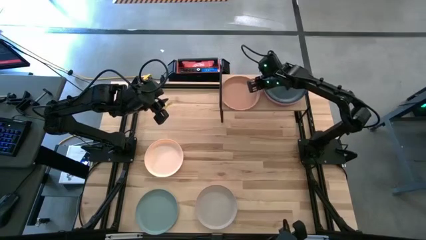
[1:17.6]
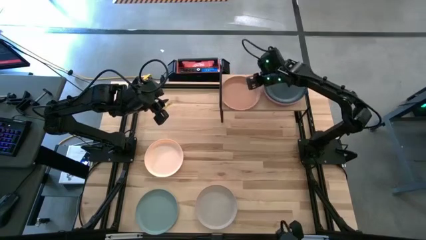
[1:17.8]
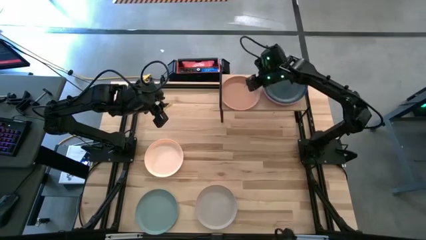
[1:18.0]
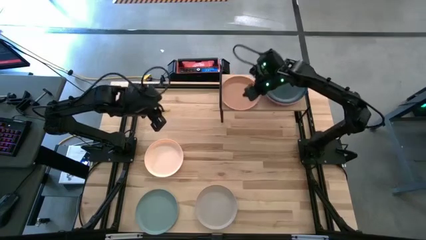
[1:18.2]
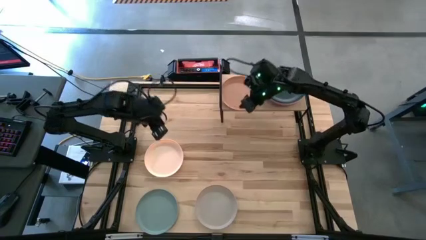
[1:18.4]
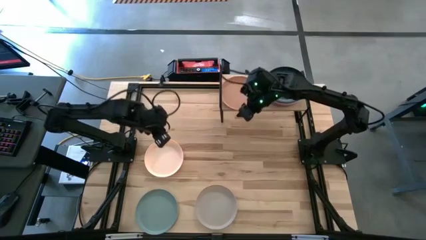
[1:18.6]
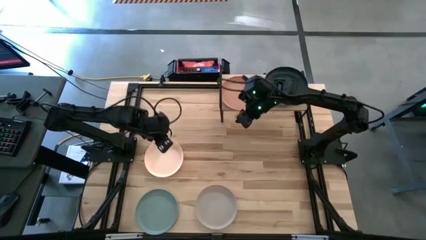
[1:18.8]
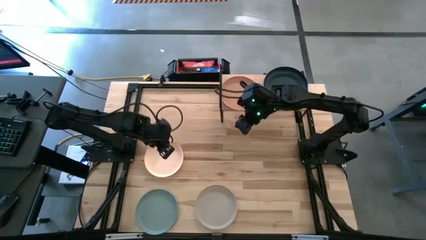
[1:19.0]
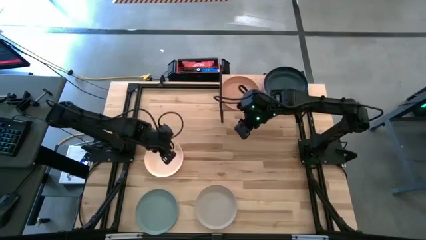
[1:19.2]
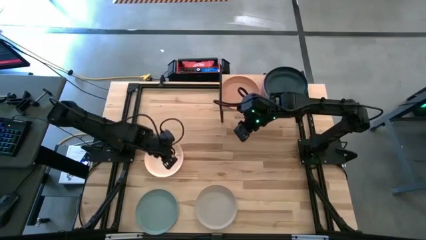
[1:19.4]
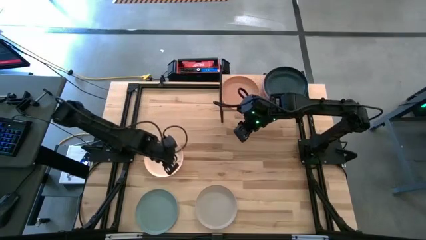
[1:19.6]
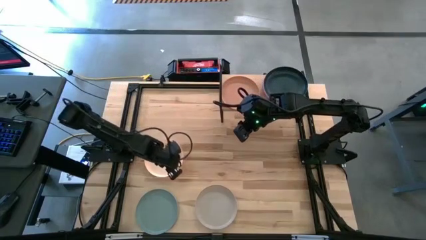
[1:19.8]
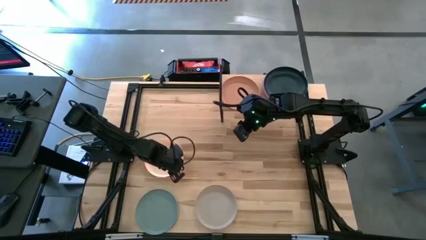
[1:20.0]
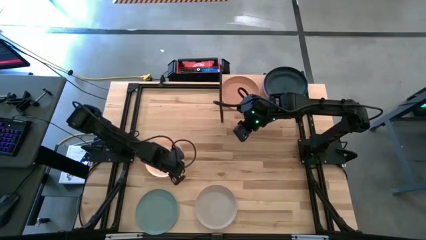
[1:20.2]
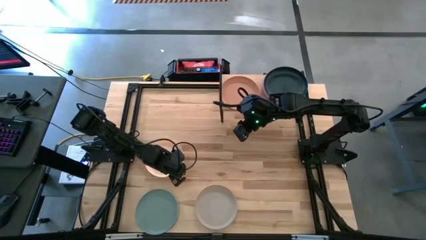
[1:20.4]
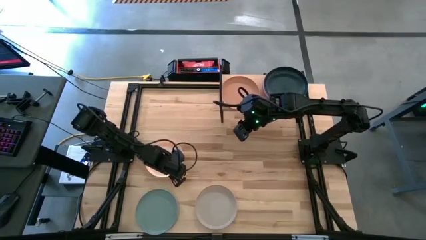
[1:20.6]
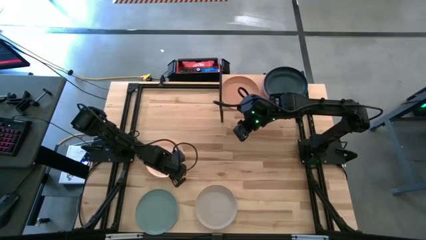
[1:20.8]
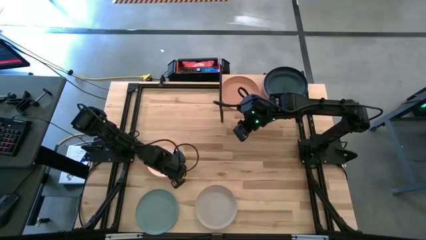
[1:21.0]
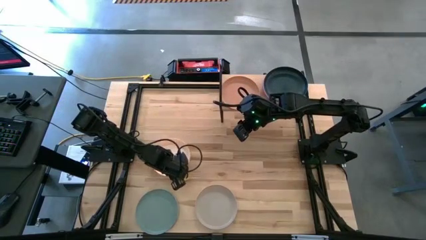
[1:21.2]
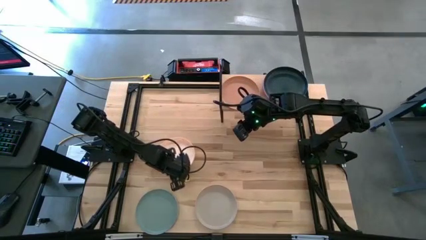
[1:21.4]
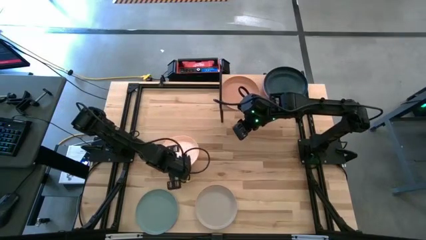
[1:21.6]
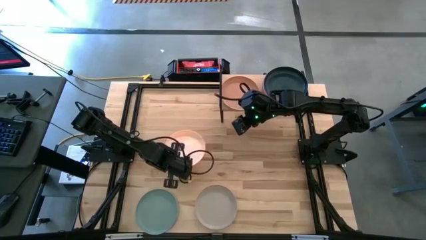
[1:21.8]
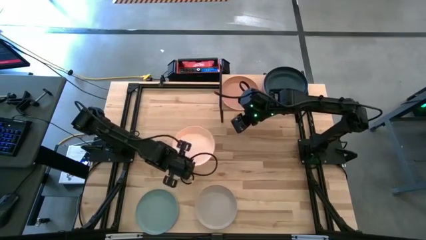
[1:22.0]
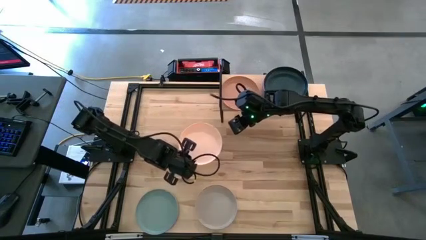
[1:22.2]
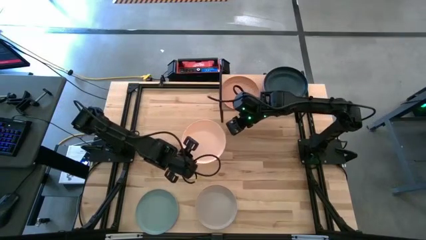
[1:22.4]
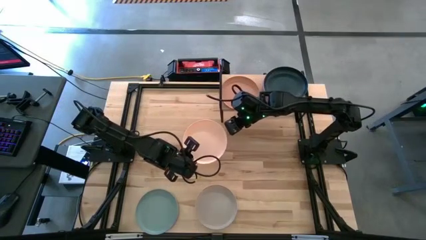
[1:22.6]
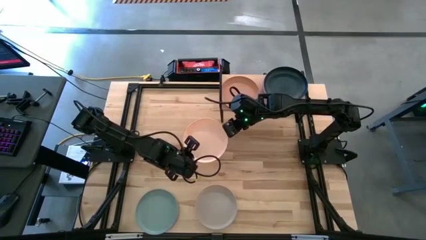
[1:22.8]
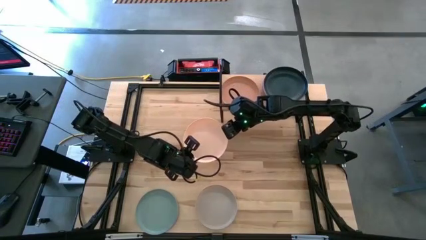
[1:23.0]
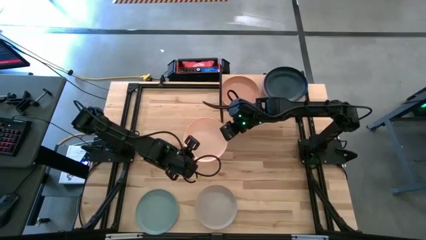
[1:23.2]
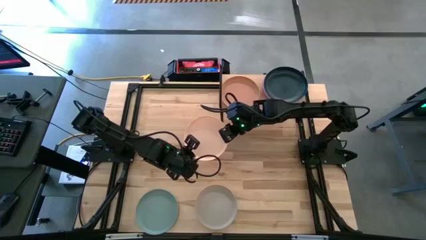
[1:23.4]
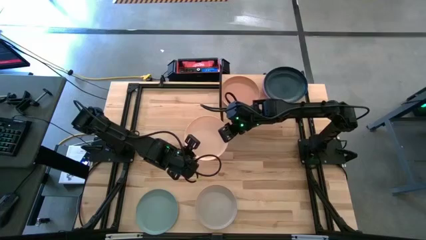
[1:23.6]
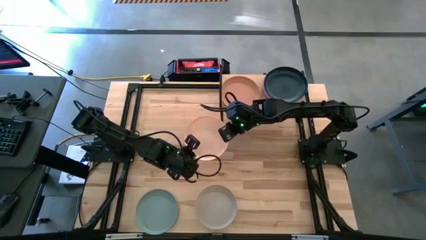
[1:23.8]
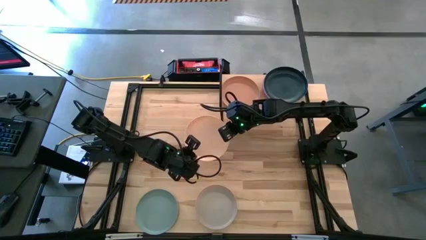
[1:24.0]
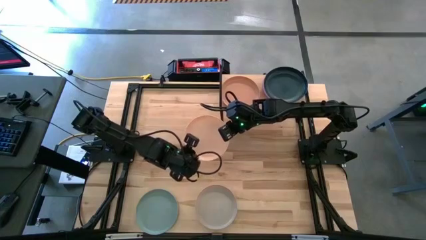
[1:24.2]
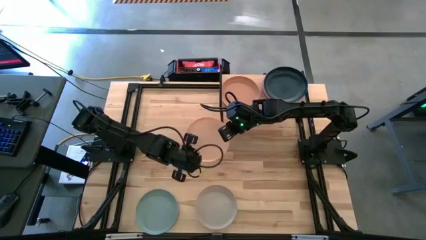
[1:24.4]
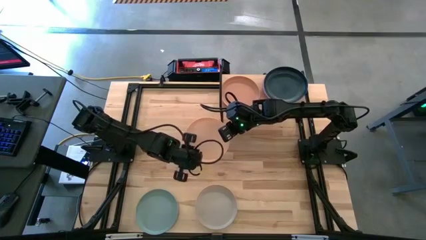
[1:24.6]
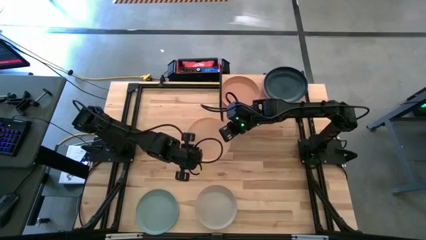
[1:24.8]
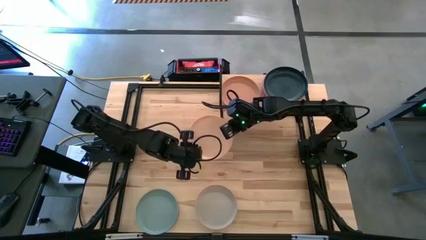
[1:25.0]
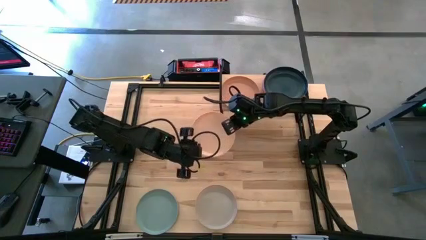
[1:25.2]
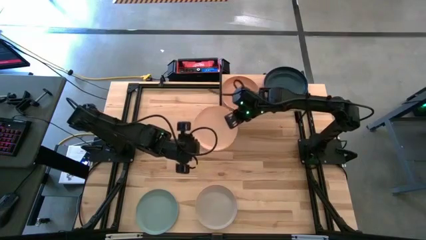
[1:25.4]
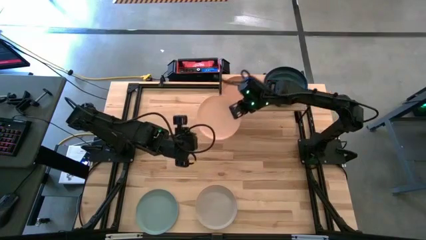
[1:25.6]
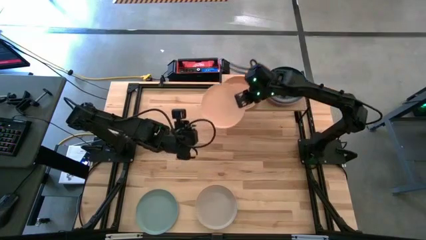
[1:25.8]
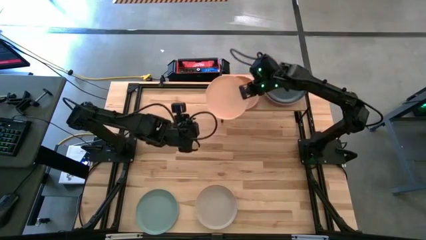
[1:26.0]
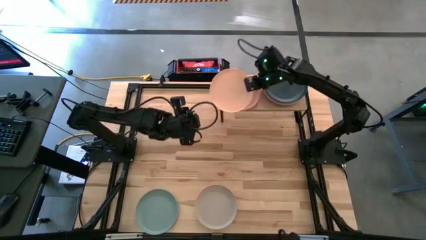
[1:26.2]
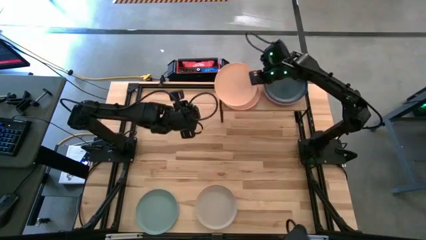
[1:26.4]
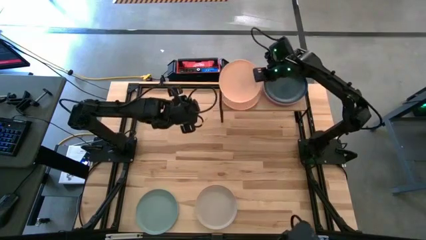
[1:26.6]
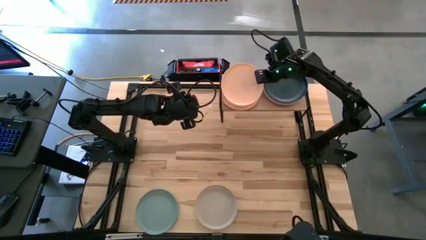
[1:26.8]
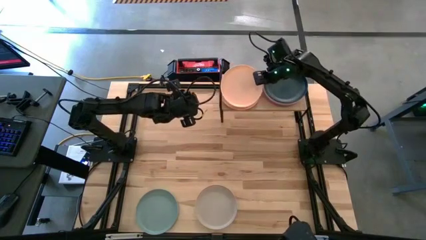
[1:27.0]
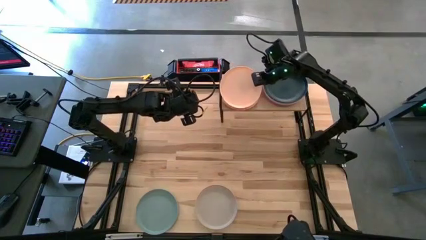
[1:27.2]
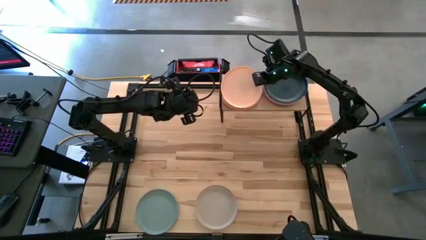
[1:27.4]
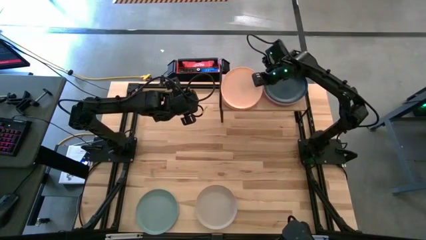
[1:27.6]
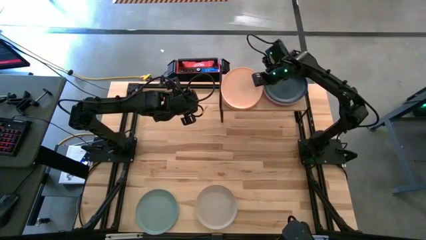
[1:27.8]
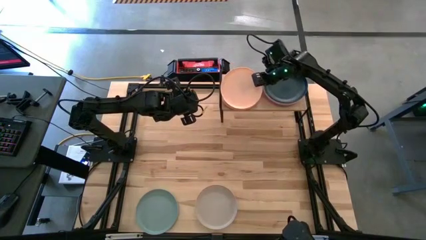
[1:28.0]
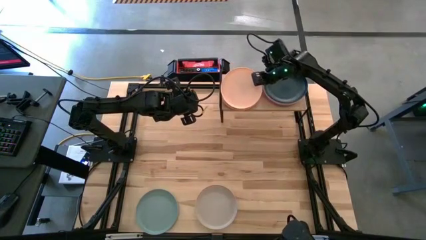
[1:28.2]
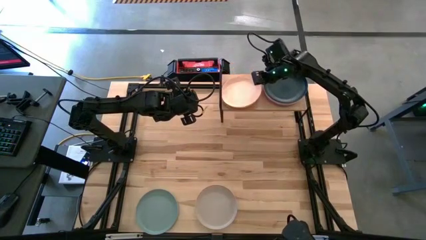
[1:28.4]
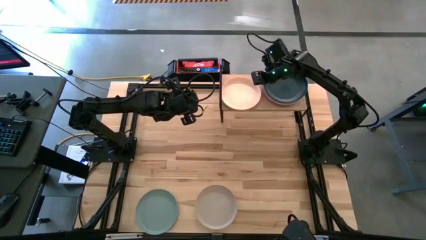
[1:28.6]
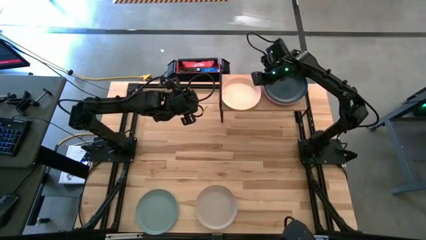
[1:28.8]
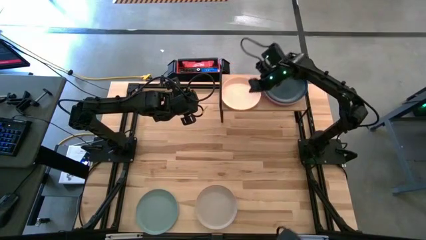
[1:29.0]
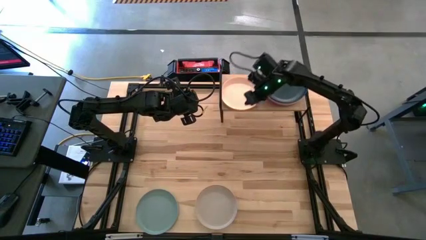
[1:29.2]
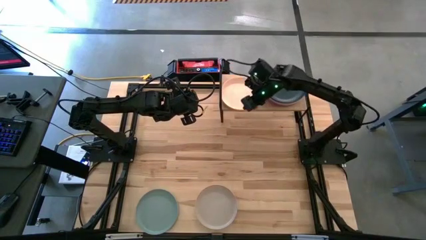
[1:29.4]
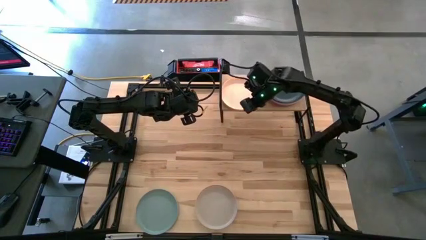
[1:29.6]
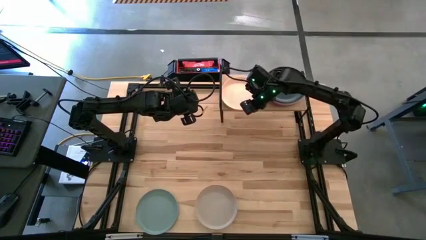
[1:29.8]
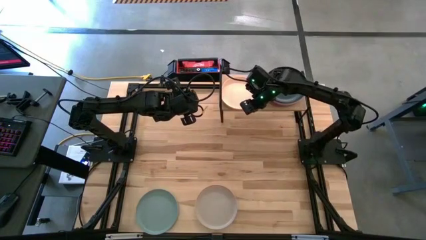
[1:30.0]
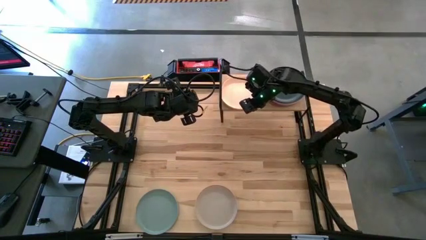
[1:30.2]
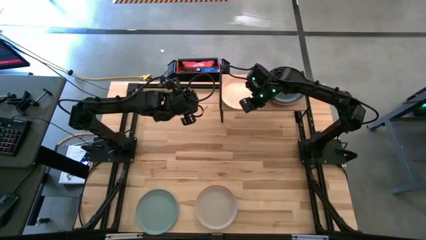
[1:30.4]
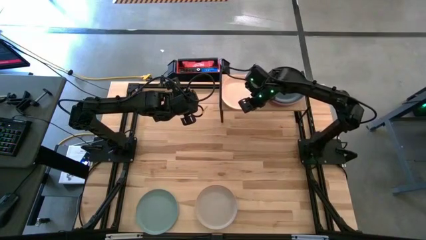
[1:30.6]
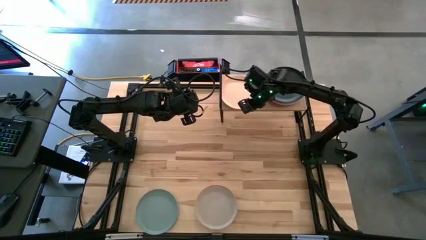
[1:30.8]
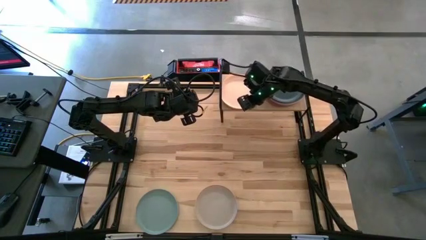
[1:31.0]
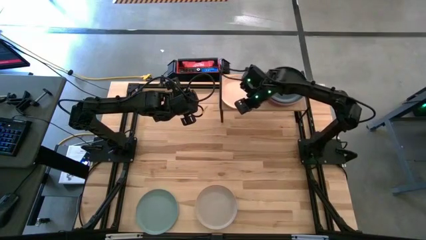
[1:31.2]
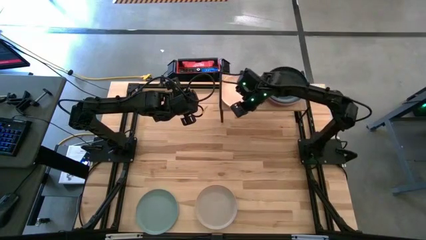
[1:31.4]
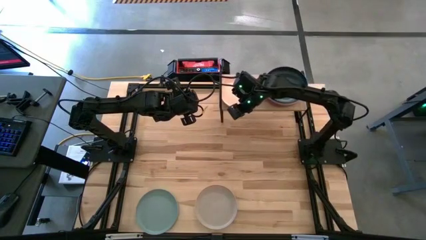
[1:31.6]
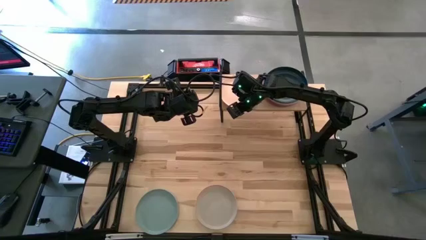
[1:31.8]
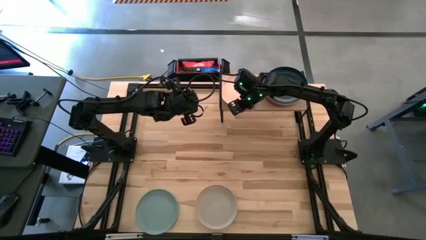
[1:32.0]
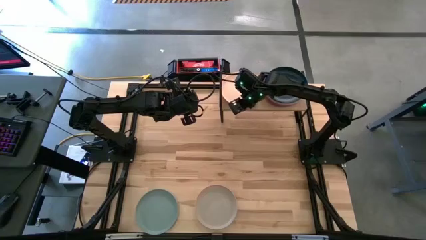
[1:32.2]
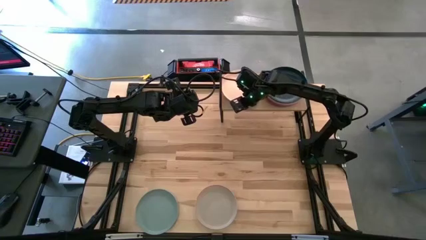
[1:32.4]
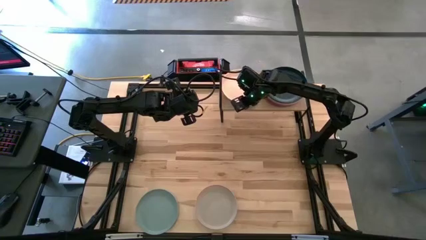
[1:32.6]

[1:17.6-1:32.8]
Task: Place and stack plates onto a shelf
Stack the light orange plate on top of the brown plate on the shelf

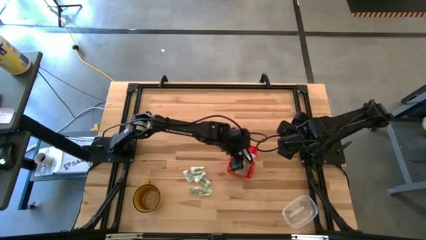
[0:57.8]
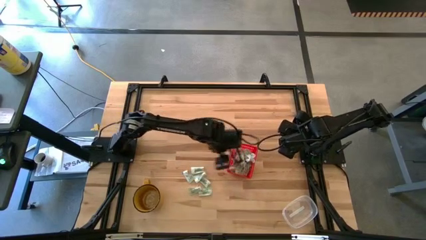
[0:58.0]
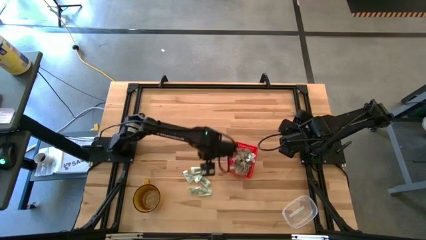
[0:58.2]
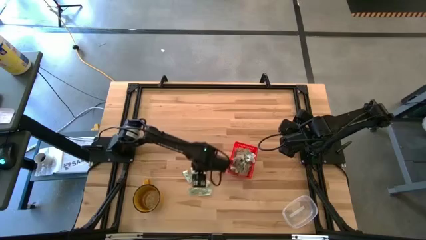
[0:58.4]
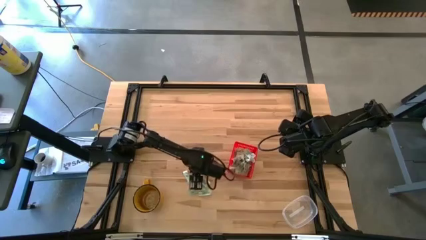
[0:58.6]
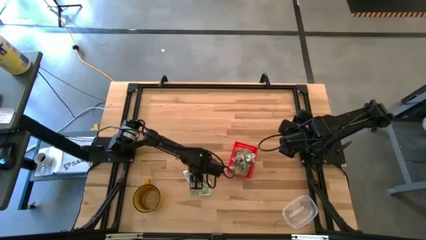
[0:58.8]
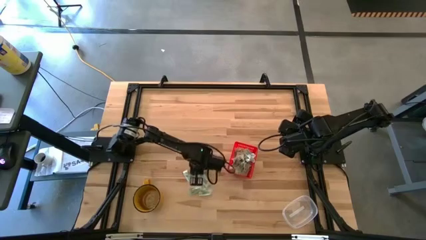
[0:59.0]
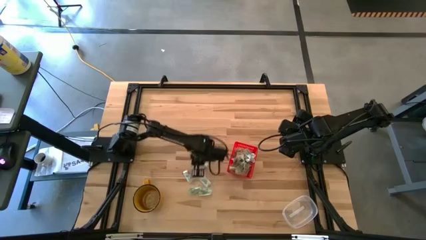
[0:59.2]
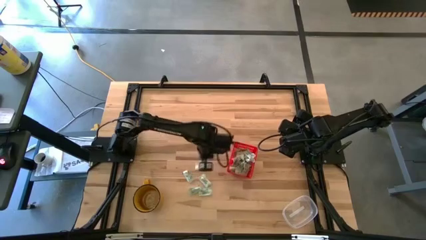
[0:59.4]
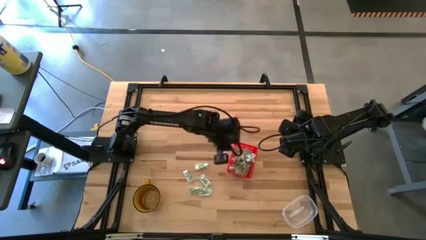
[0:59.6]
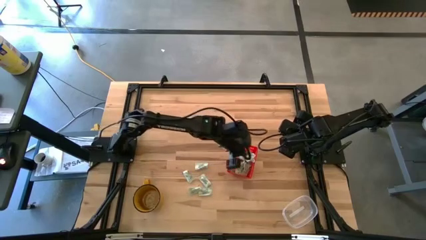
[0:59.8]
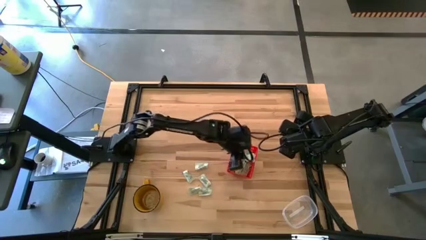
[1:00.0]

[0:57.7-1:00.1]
Task: Pick and place items into bin
Put the light green stevia packet into the red bin
